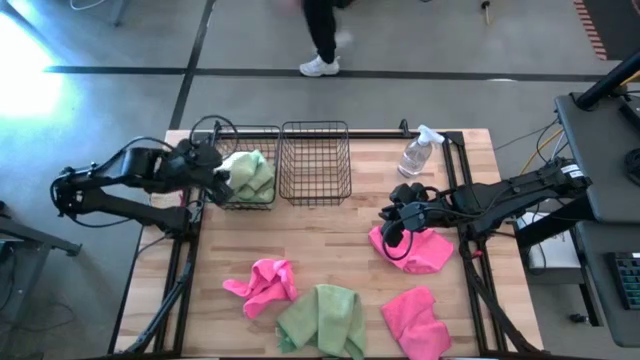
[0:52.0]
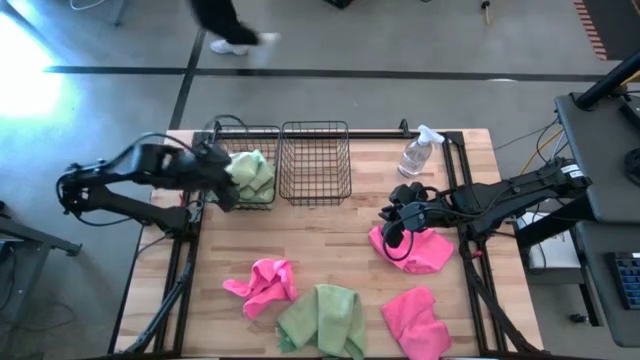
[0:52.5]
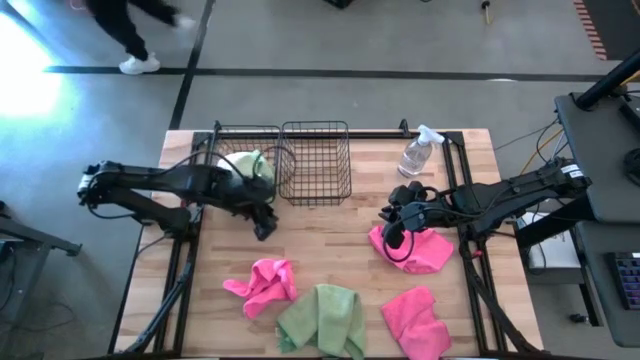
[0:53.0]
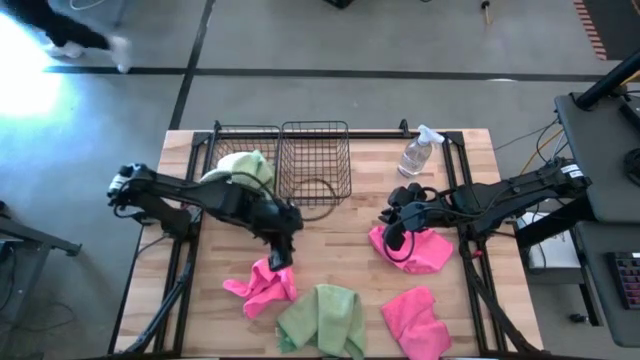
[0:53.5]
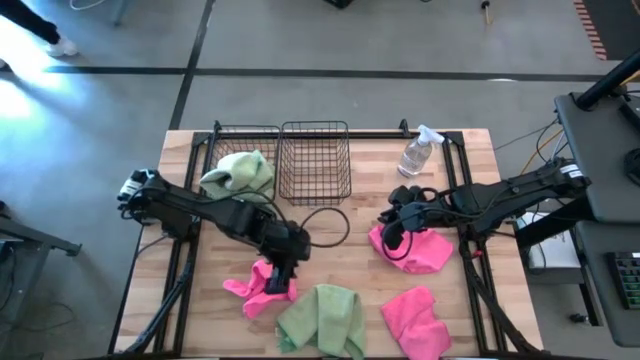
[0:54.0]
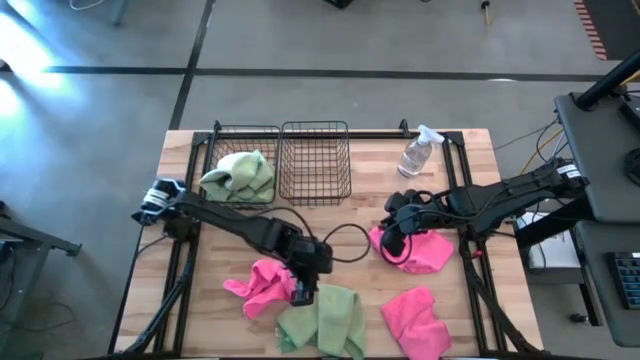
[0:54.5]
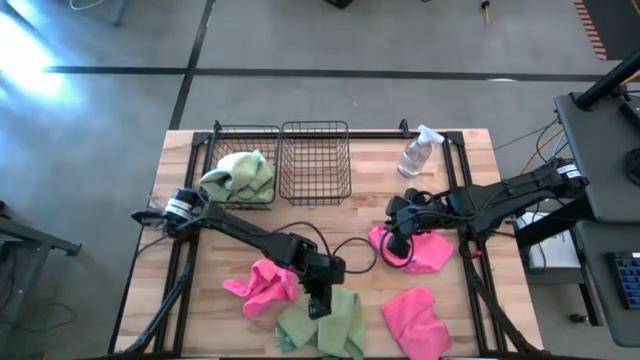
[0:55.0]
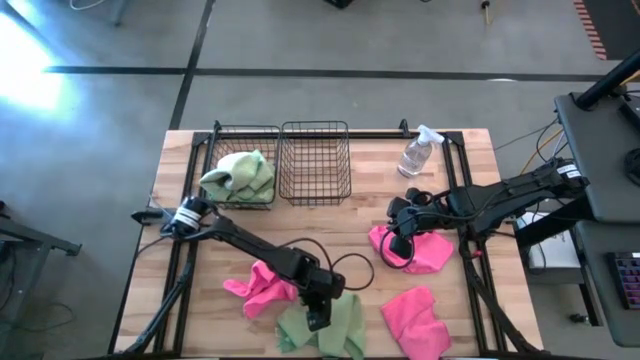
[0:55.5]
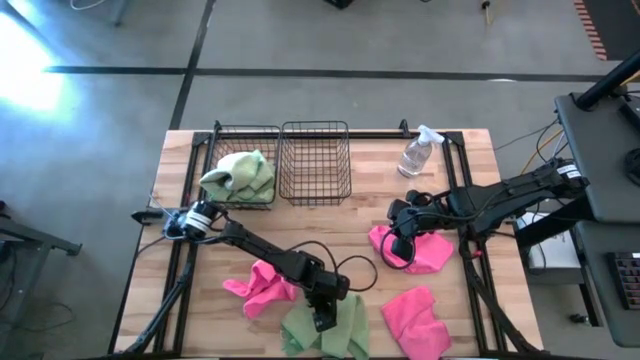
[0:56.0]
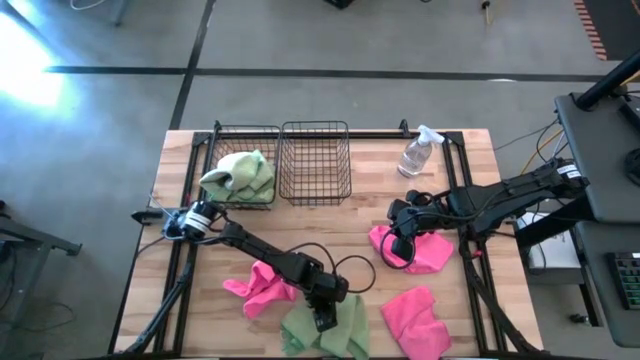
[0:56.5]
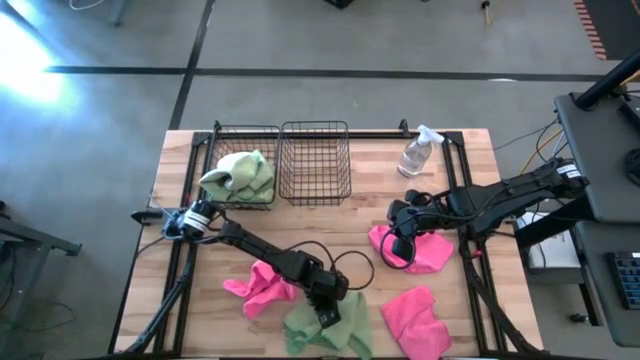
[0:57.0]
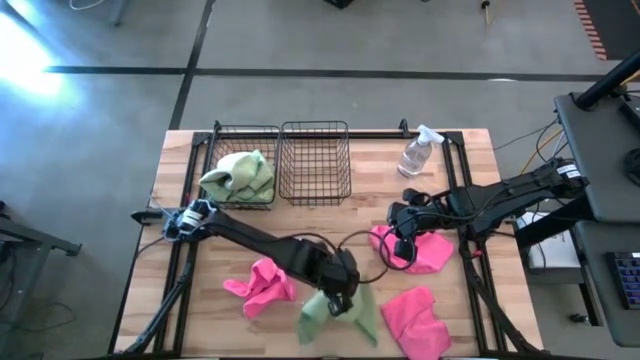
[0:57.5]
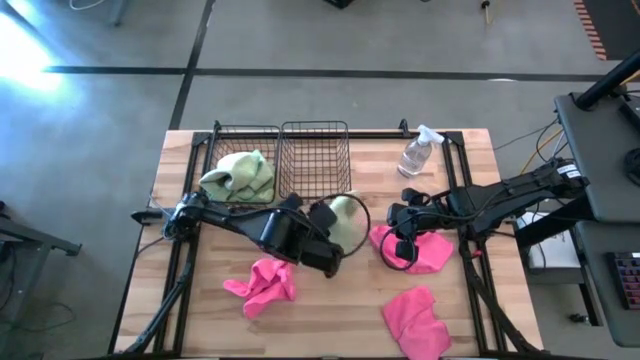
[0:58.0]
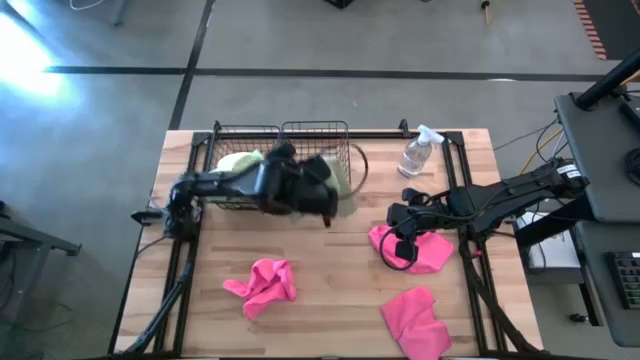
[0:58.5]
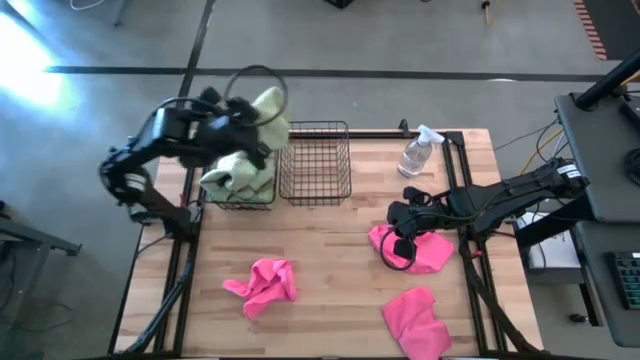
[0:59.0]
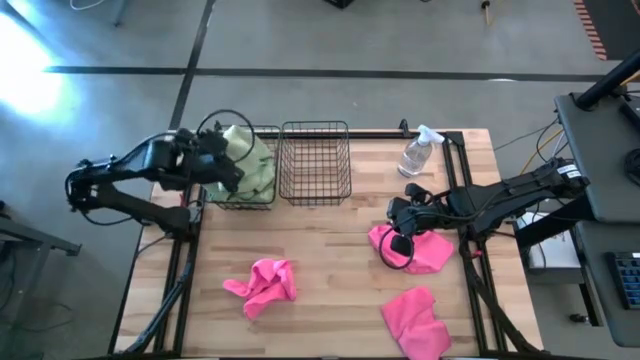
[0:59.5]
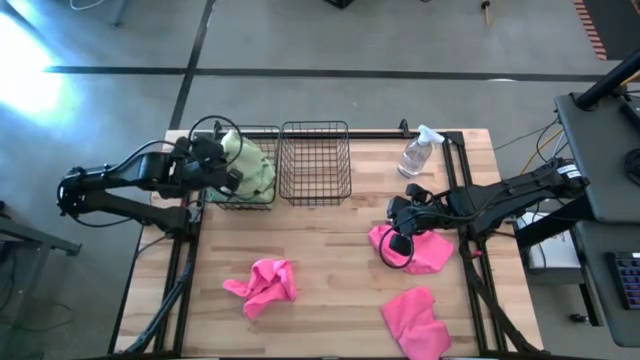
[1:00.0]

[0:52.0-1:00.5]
Task: Sort microfiber towel by color & place in baskets
Put the green microfiber cloth into the left wire basket

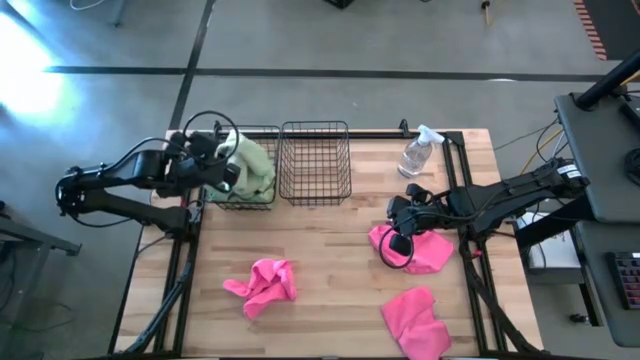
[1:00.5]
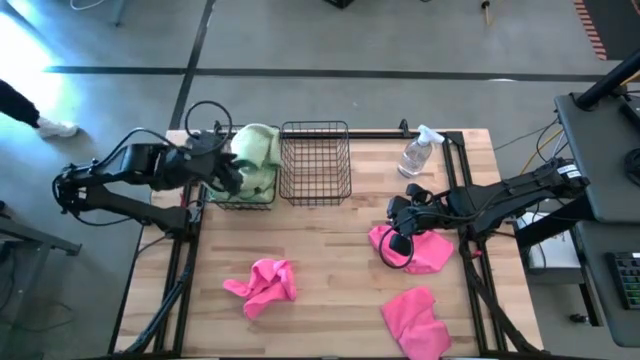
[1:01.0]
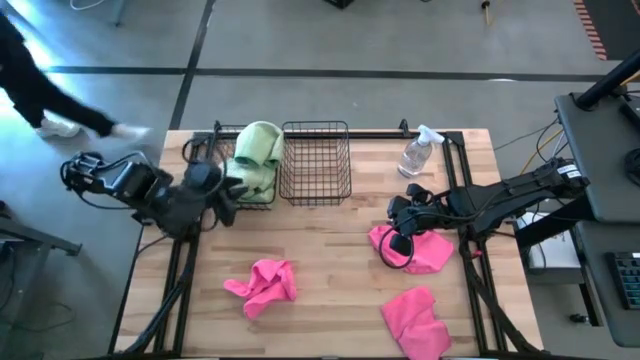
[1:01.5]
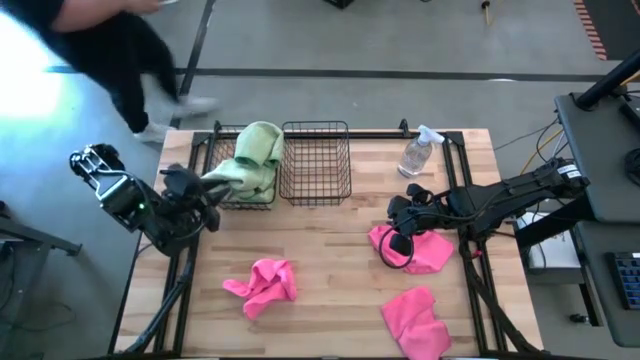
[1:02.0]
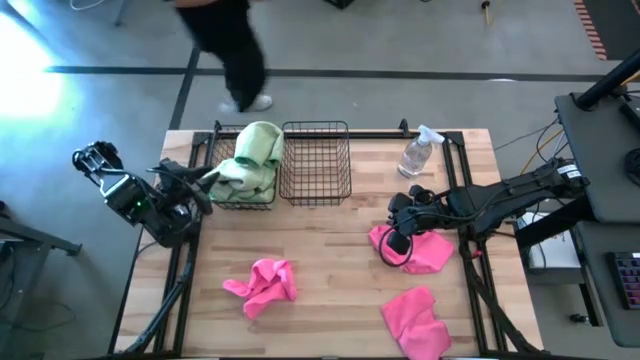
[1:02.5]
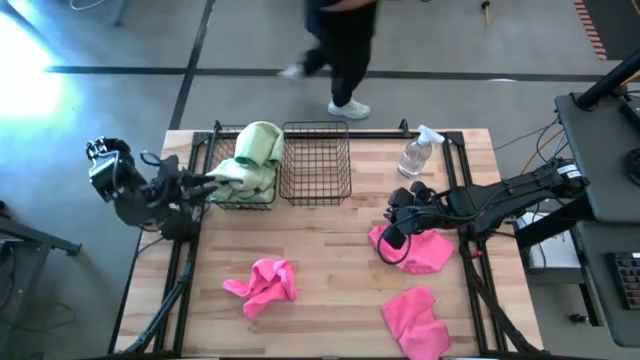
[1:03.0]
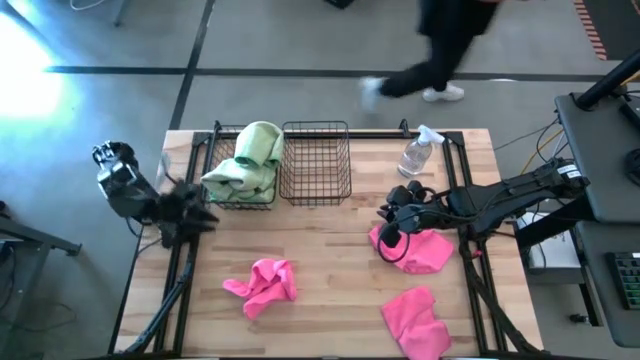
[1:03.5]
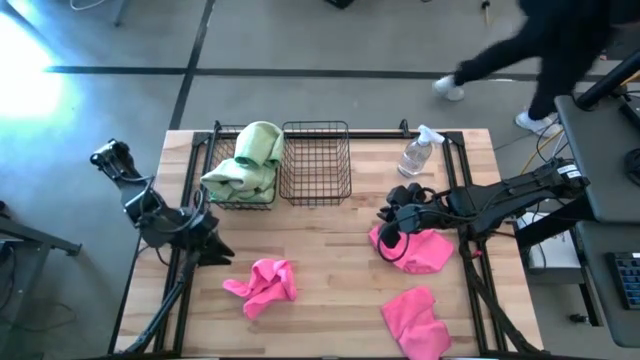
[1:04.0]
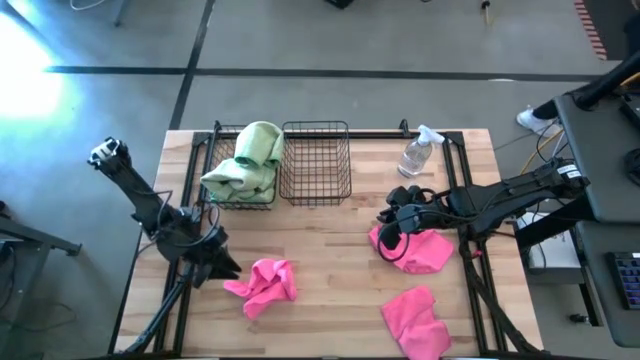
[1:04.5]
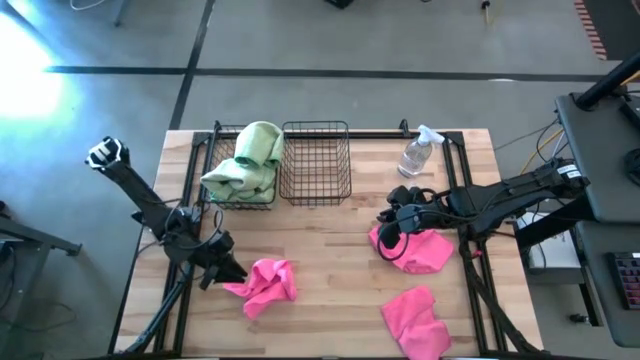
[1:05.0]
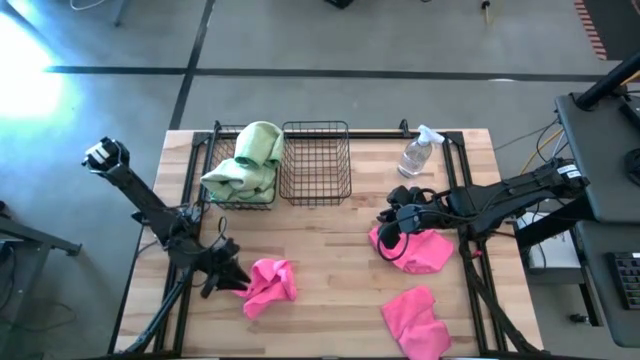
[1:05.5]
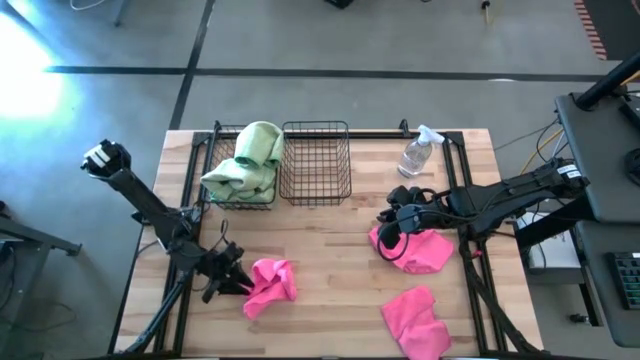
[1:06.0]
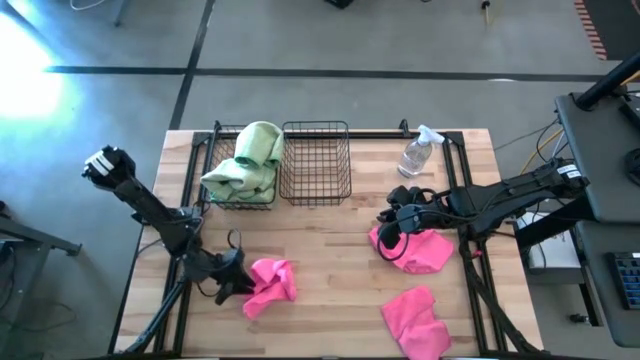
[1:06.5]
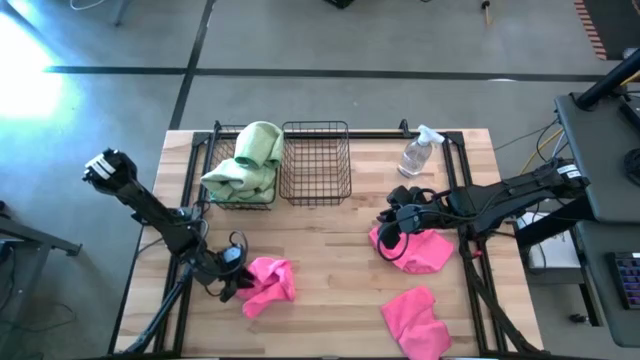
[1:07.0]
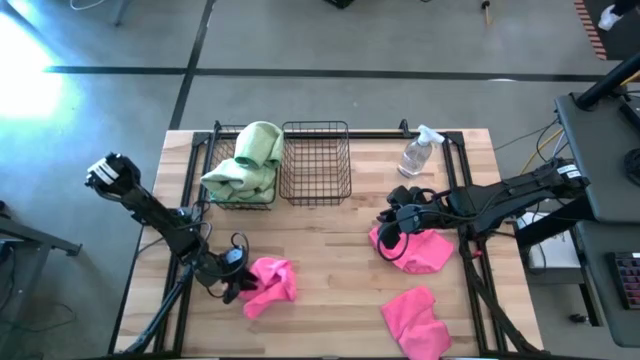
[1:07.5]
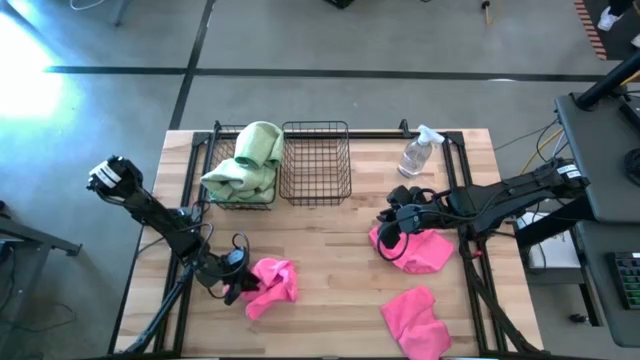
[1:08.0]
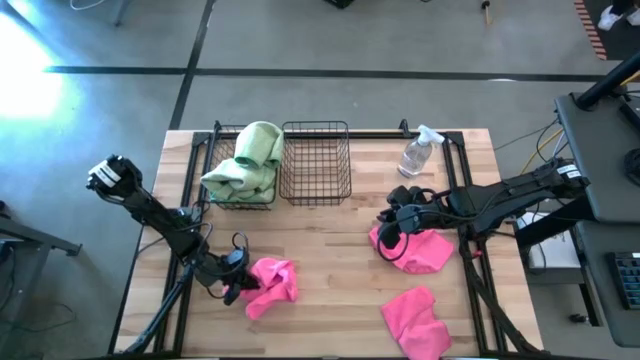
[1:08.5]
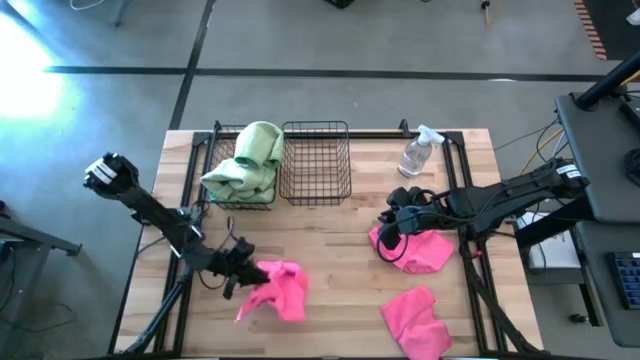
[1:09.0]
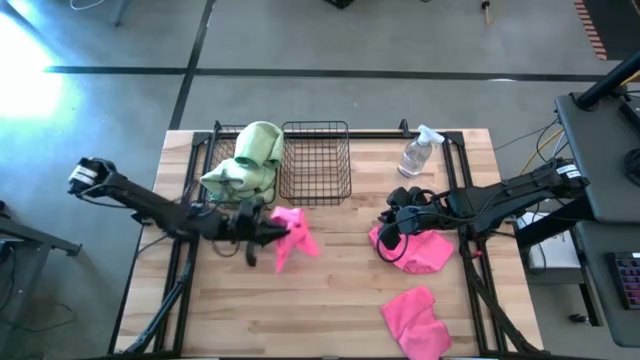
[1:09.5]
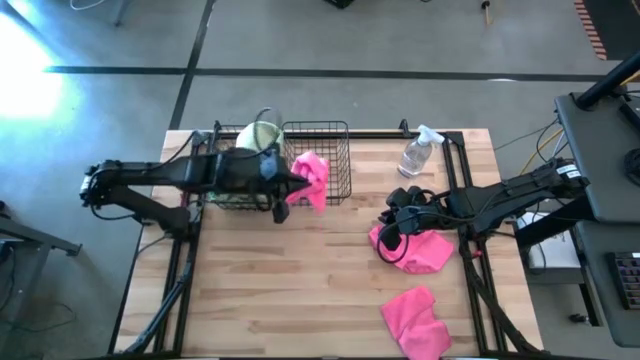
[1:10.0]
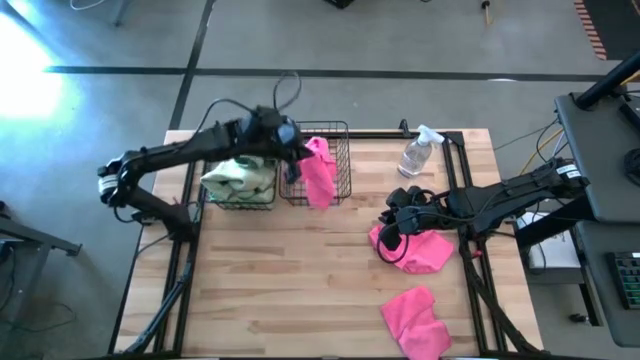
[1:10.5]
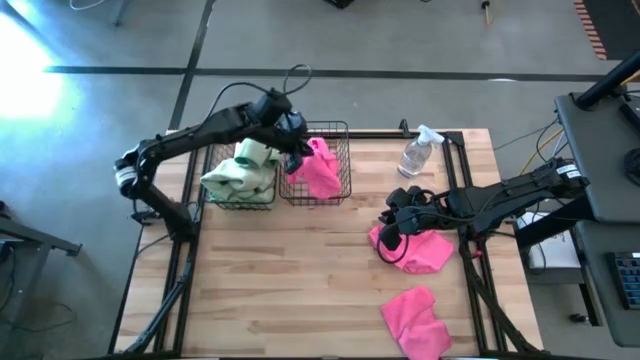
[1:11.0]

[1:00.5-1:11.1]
Put the pink microfiber cloth into the right wire basket

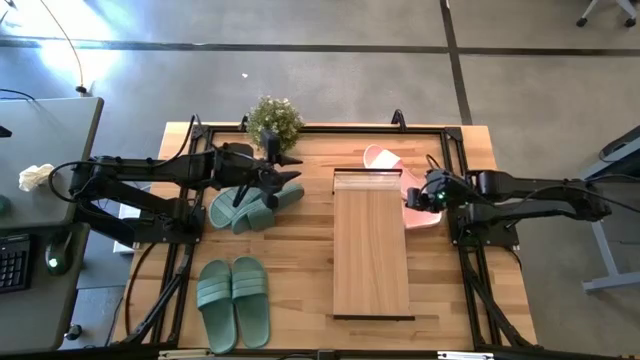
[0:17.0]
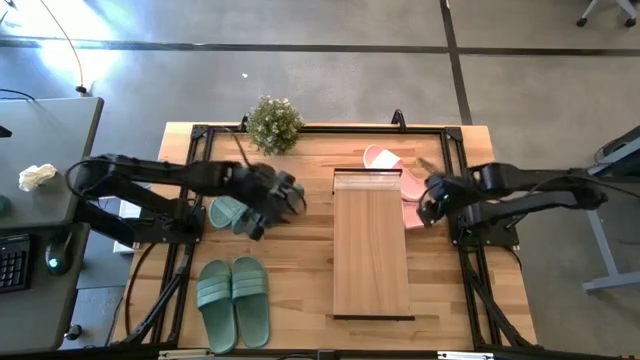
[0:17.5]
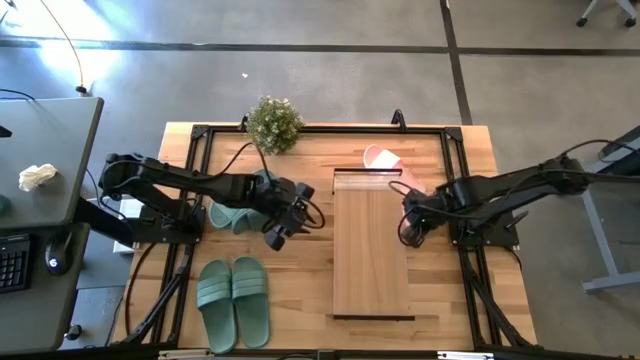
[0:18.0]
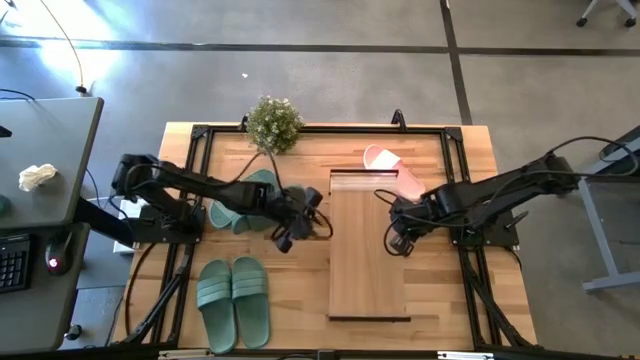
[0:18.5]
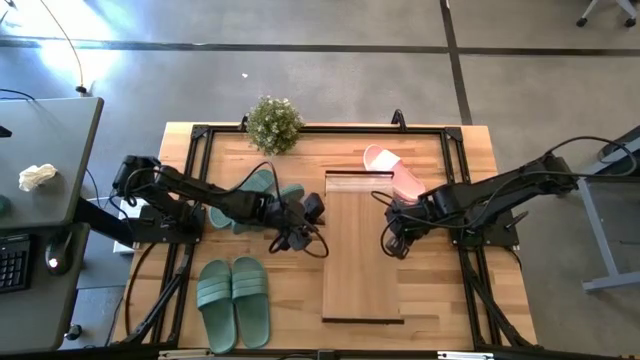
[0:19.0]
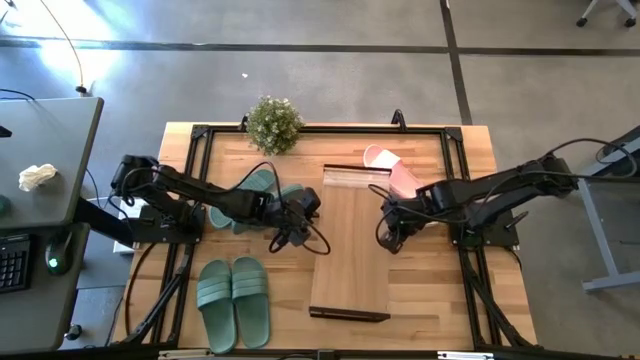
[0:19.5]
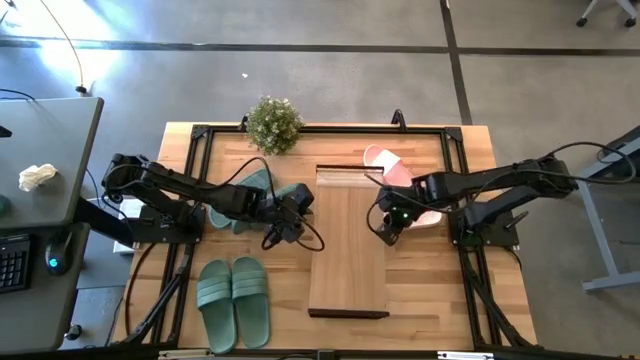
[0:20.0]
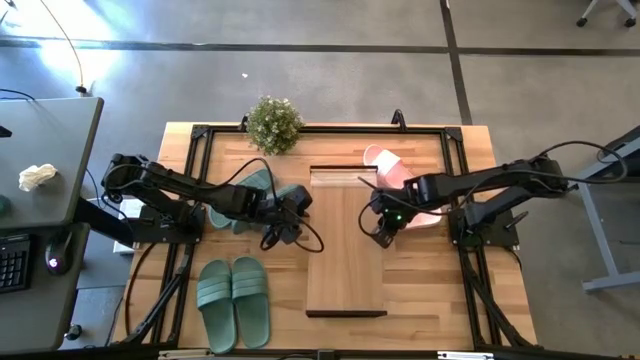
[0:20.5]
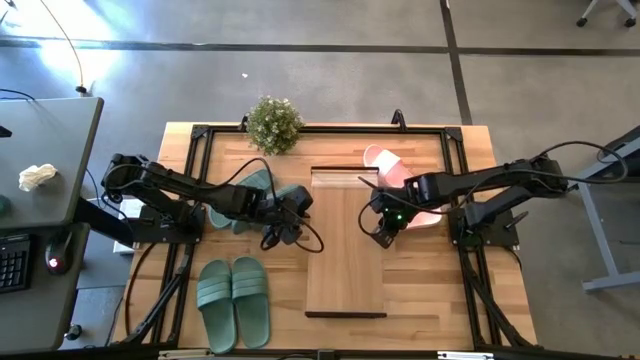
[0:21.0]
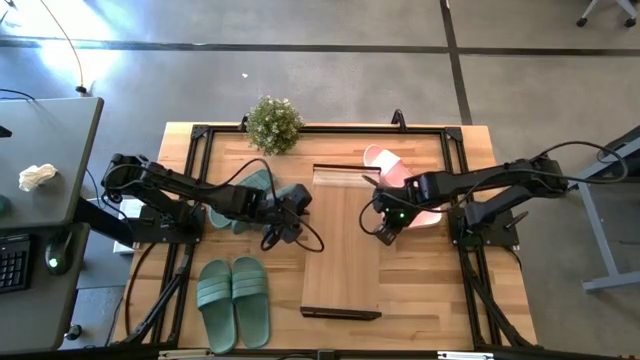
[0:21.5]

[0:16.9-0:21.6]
Task: Pick and place slides into the shelf
Adjust the shelf
